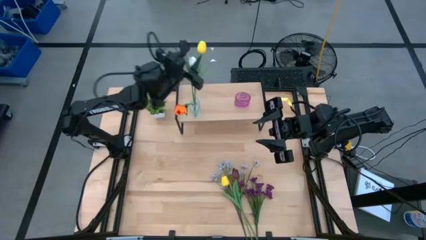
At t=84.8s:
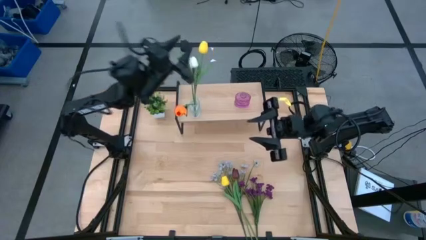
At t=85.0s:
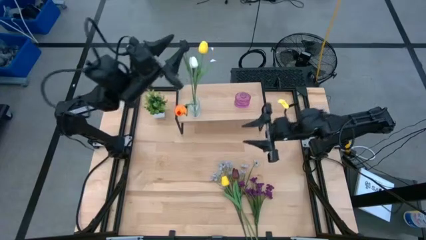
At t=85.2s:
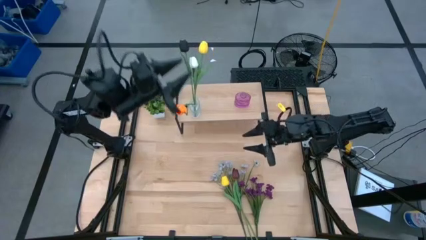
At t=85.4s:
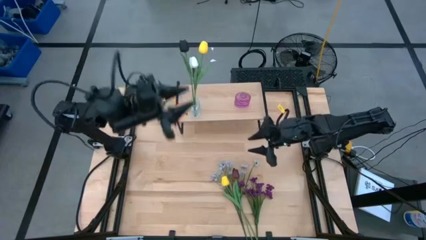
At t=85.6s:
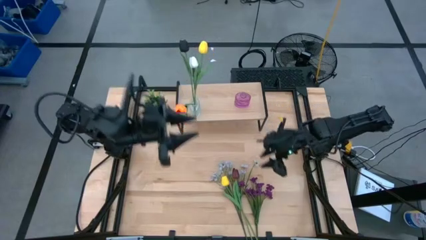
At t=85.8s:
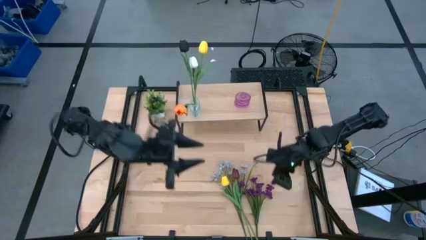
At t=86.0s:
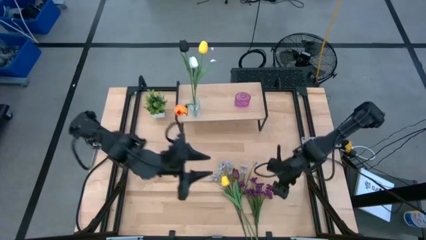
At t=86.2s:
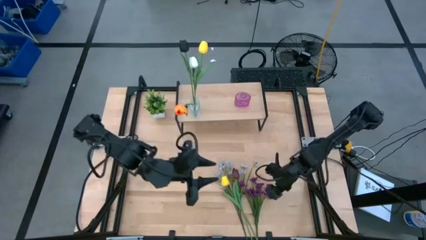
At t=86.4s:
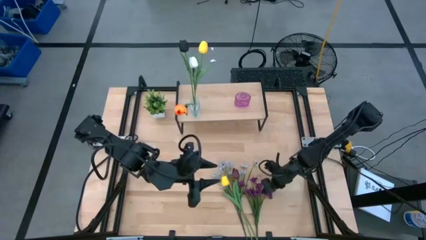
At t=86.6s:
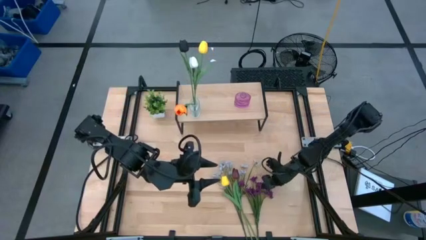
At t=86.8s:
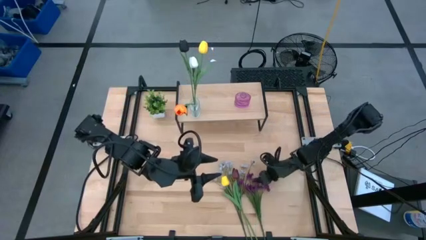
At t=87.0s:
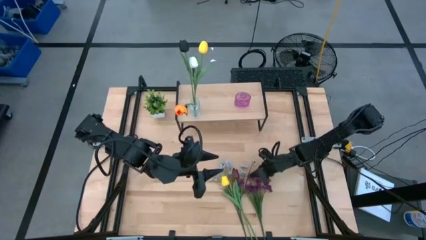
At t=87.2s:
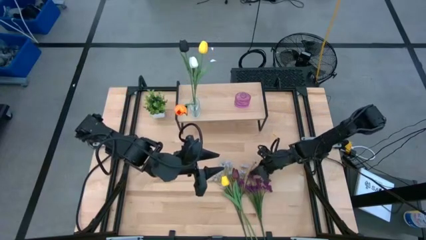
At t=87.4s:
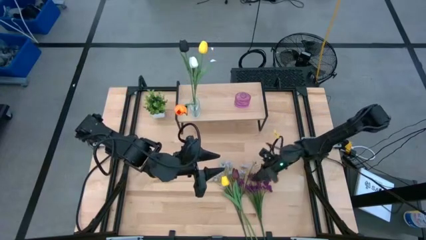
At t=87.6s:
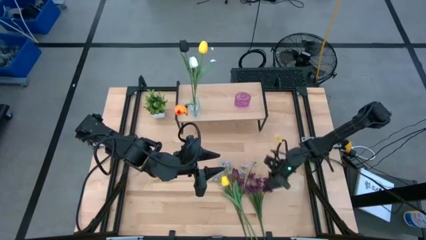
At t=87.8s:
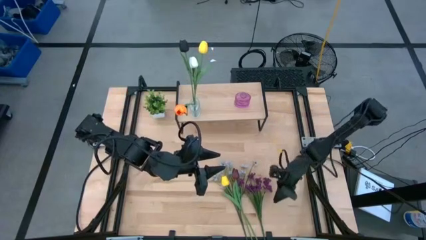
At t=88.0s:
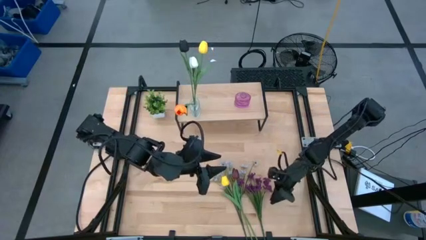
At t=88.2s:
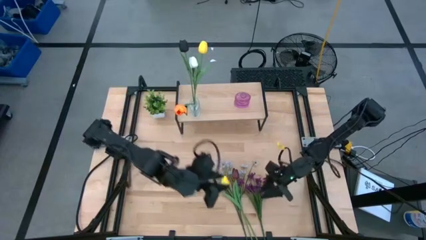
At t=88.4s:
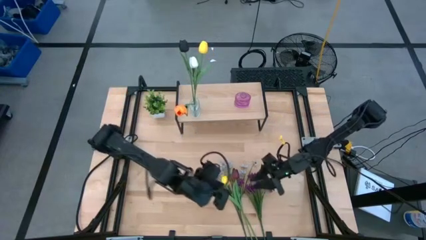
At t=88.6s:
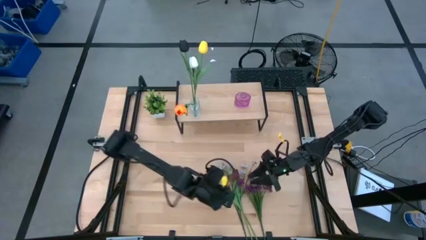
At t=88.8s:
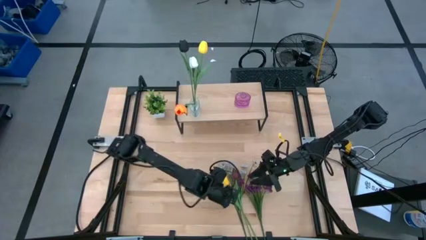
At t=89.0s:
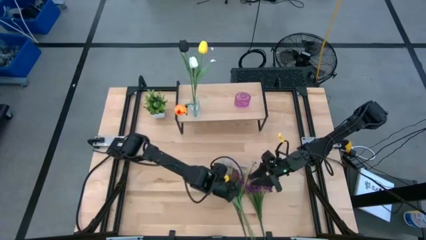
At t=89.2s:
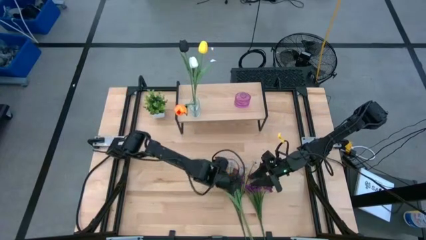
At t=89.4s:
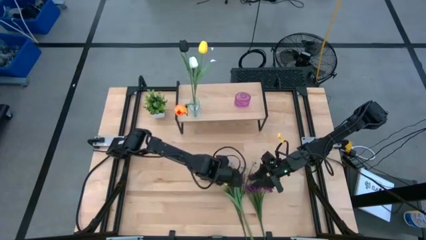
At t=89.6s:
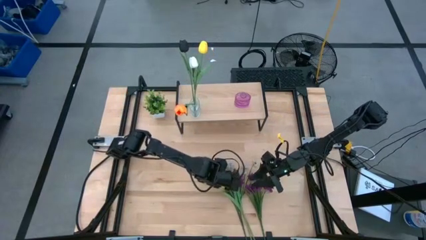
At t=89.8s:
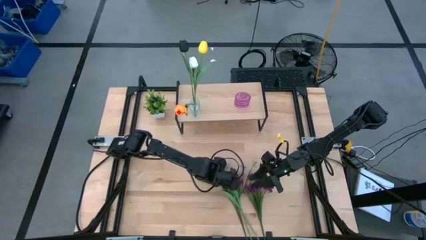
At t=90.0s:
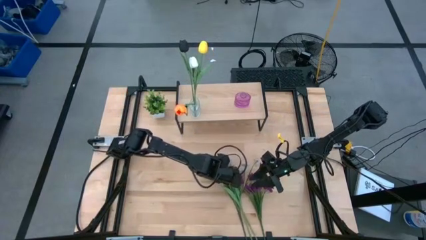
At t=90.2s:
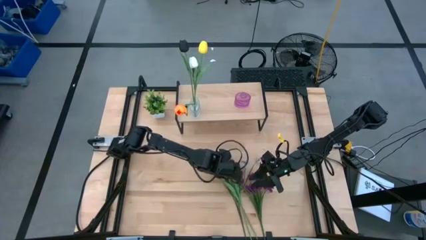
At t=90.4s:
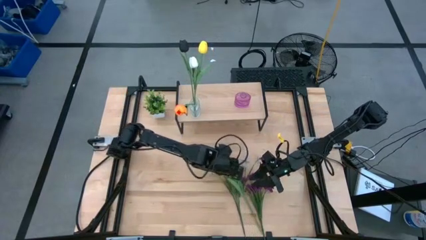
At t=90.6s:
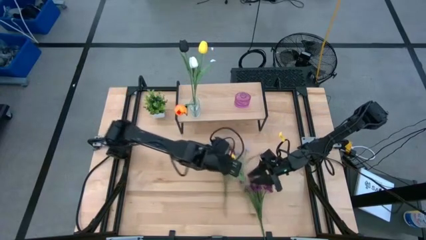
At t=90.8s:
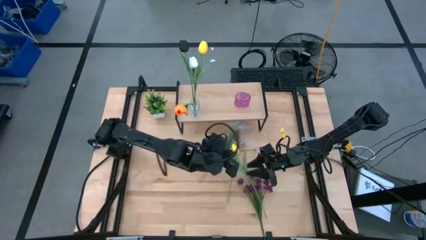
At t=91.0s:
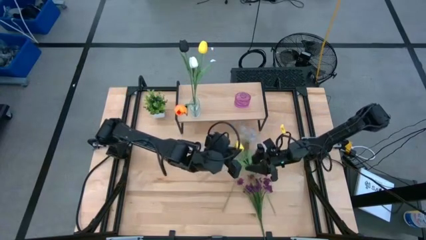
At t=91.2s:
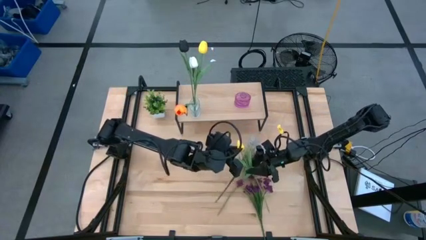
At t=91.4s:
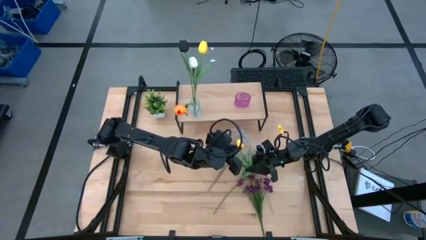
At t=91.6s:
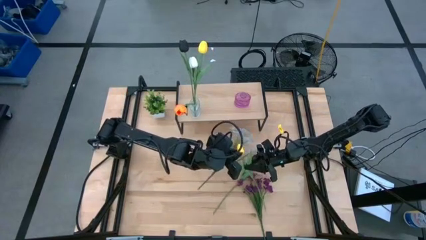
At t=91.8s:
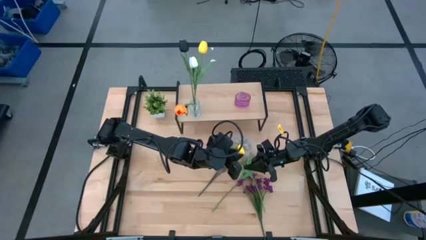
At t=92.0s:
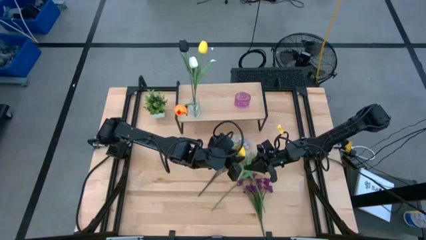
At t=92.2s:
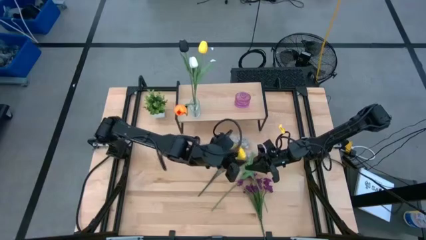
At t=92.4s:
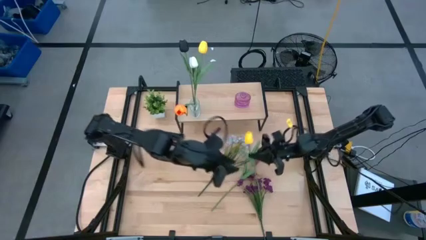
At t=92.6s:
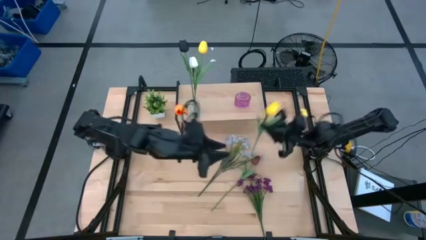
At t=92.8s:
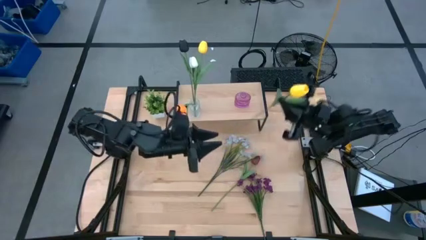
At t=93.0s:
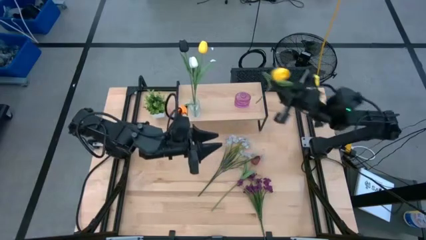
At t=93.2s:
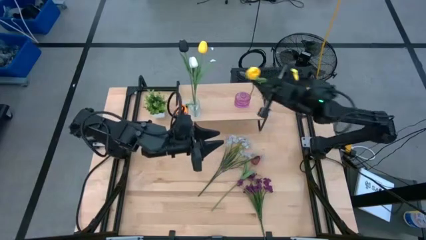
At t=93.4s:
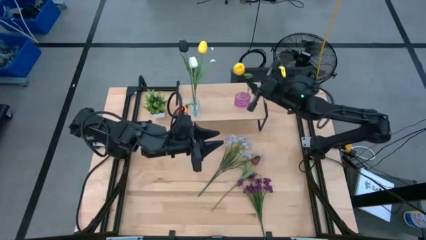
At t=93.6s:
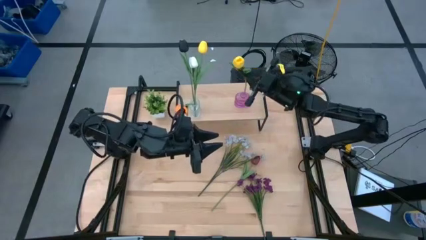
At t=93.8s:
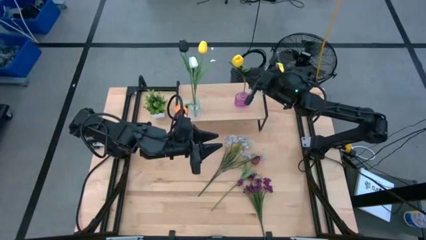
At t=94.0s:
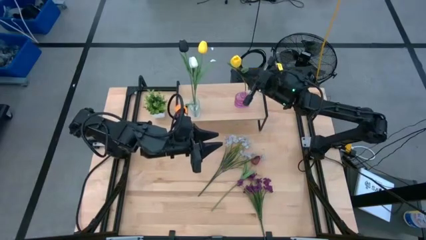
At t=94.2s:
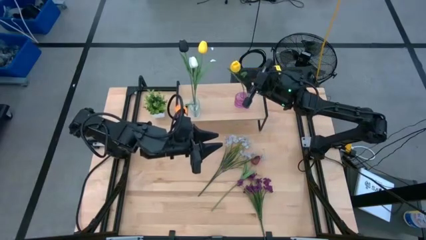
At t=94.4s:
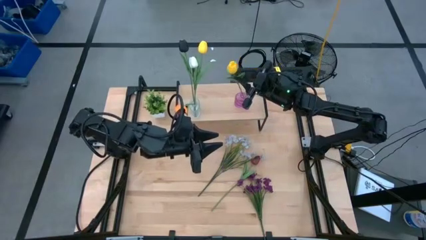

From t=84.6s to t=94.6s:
Task: Pick and place flowers into a vace then onto a shelf
Put the yellow tulip into the purple vase

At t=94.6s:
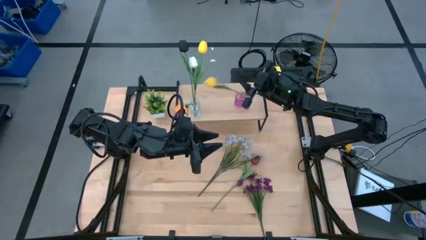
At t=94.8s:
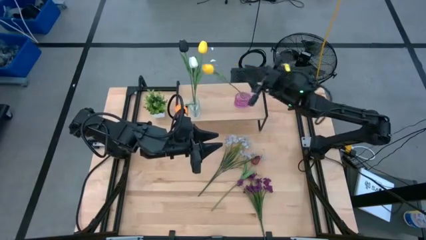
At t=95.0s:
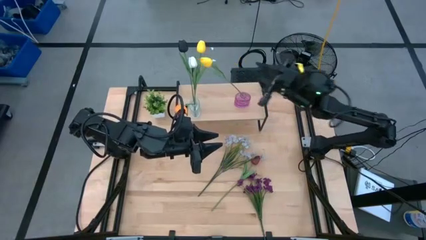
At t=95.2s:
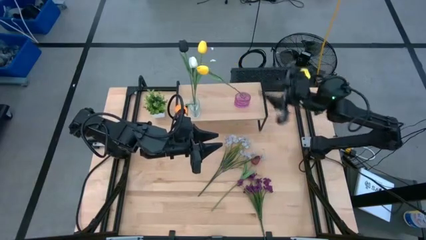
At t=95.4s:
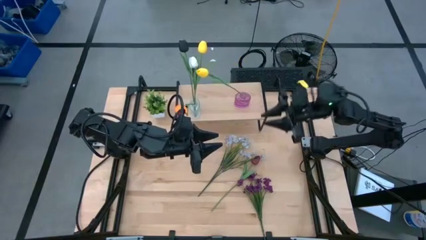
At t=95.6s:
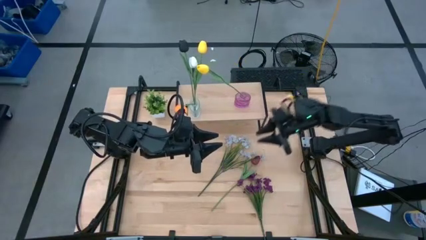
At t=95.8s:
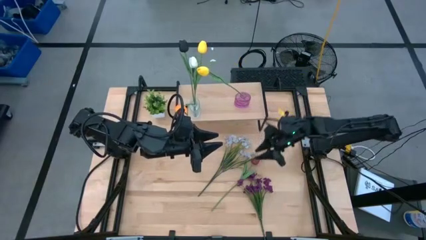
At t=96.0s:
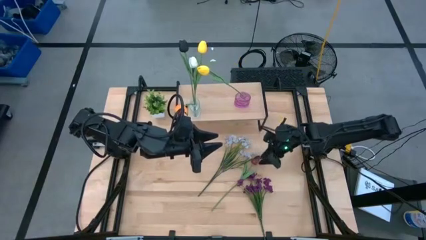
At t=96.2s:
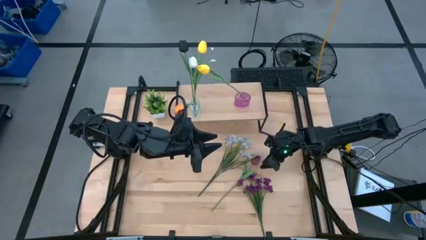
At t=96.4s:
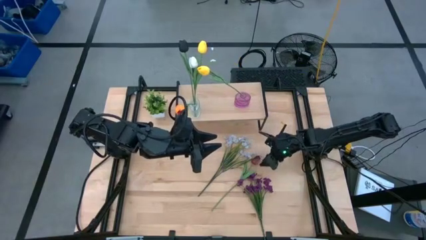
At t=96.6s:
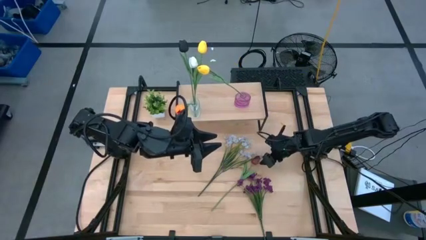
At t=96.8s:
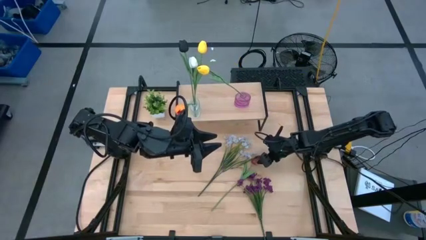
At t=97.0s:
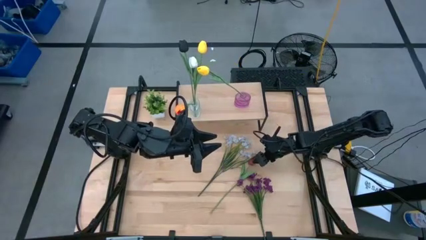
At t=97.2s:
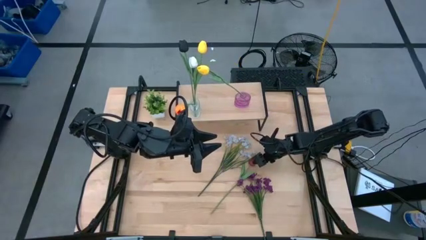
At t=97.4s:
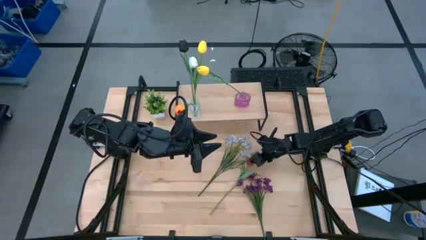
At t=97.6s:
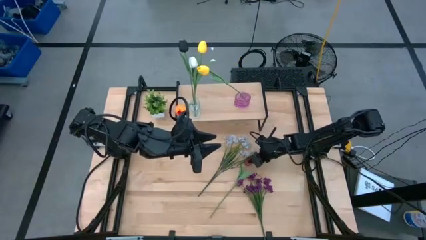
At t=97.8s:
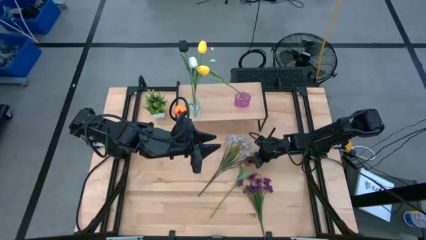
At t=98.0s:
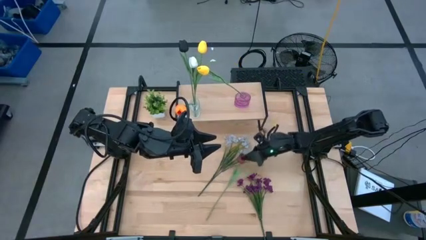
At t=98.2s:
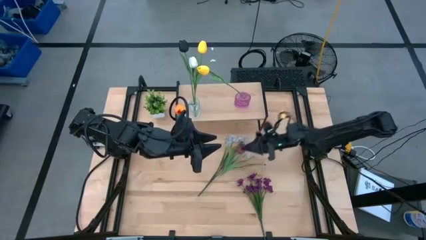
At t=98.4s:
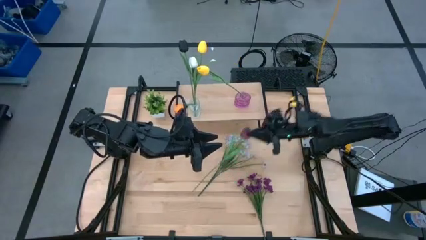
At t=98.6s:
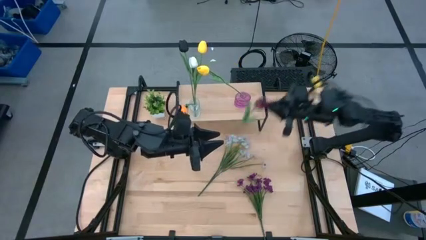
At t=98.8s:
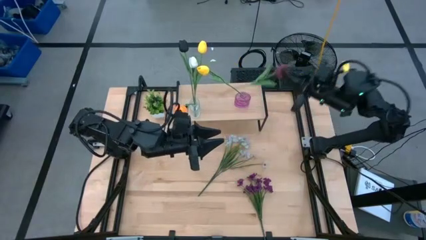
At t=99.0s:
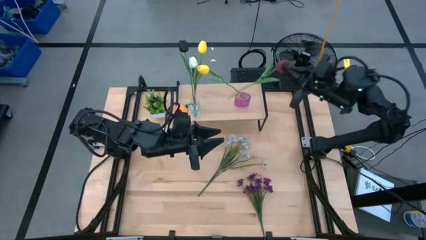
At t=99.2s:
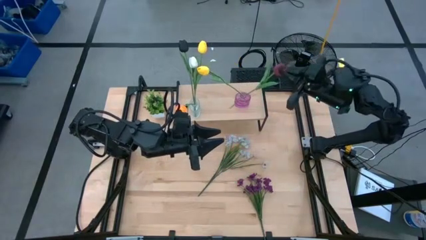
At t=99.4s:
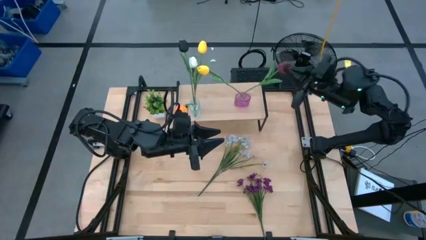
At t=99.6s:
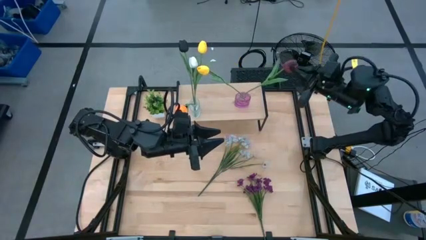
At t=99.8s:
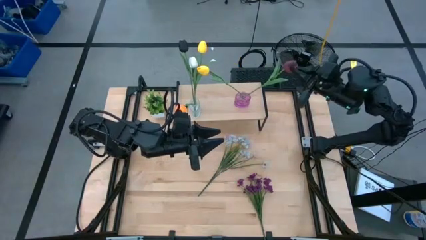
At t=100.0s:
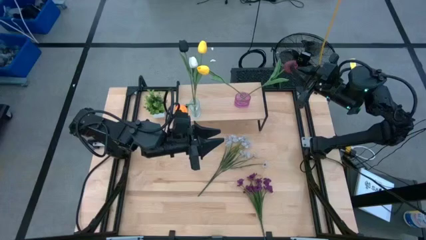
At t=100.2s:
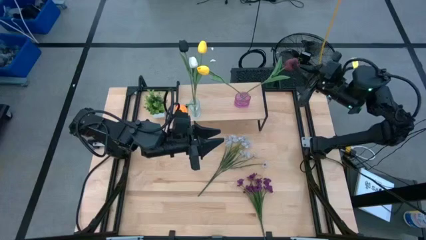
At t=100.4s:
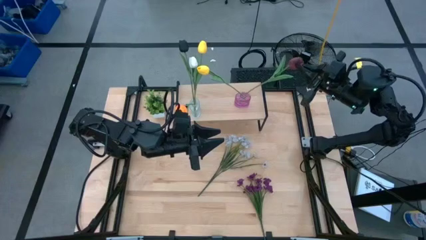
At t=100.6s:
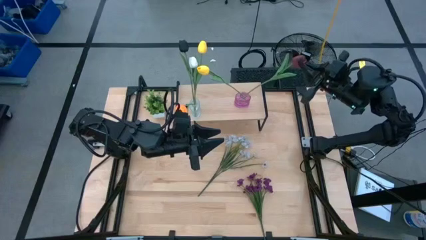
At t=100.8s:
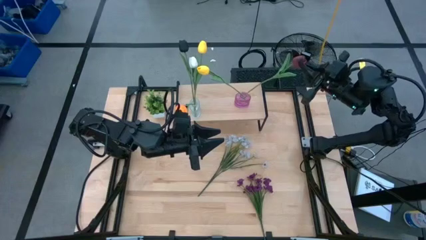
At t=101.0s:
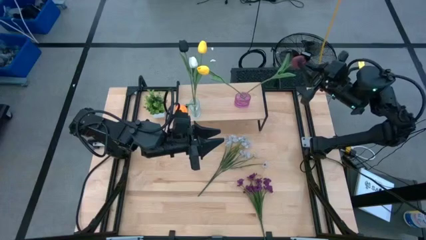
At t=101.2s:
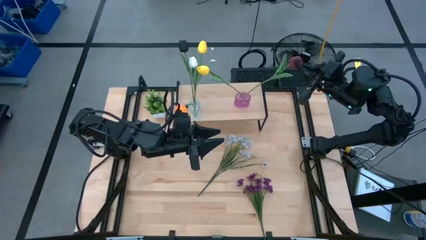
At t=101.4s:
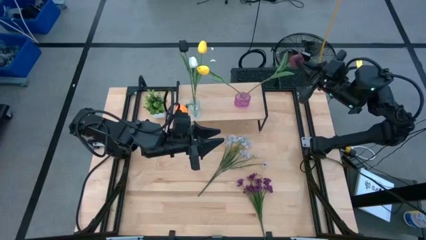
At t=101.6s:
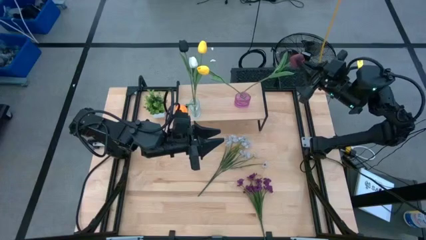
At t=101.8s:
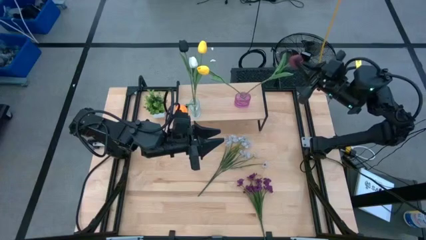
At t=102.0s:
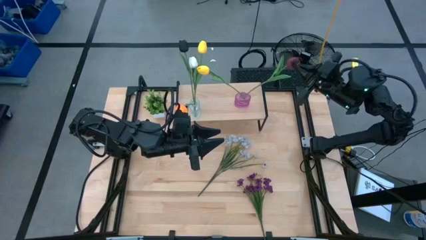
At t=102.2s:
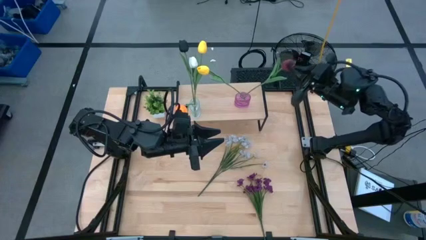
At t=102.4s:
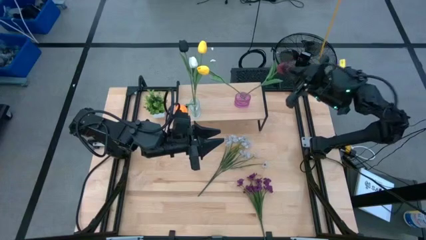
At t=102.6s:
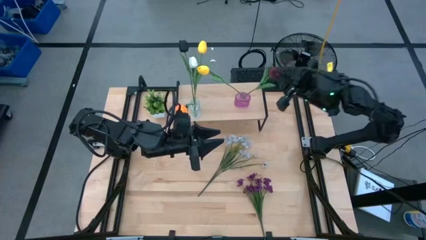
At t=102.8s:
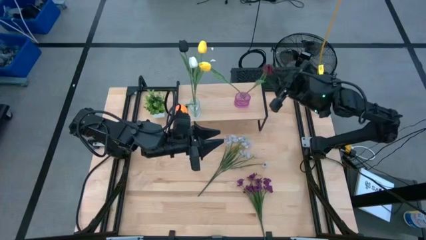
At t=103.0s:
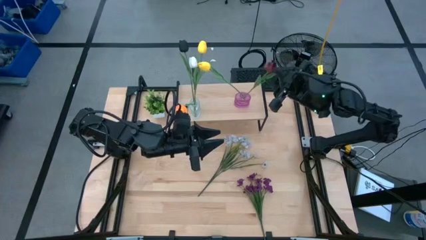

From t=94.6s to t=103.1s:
Put the dark red tulip into the purple vase
